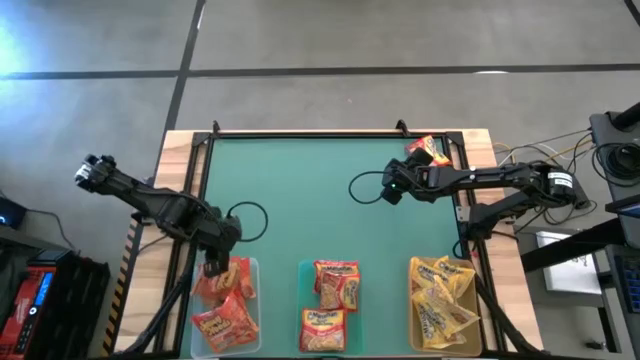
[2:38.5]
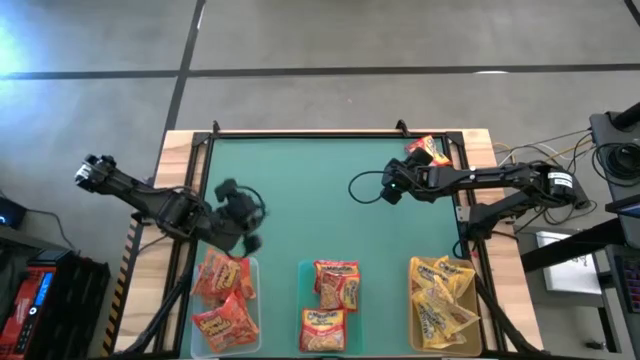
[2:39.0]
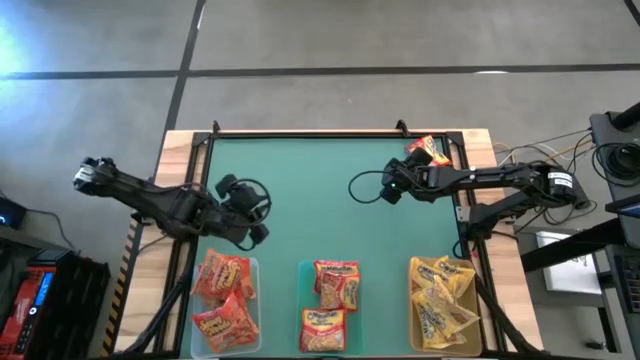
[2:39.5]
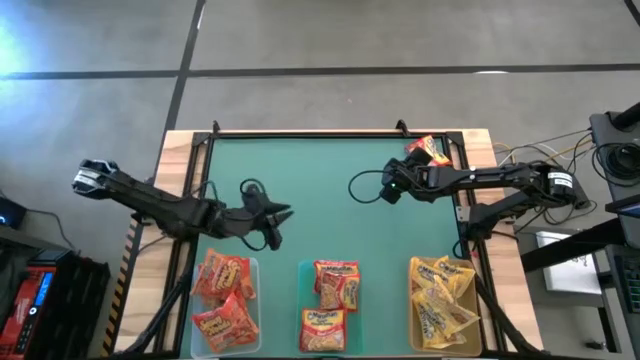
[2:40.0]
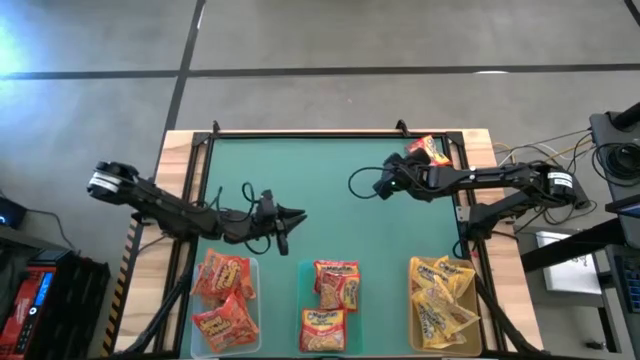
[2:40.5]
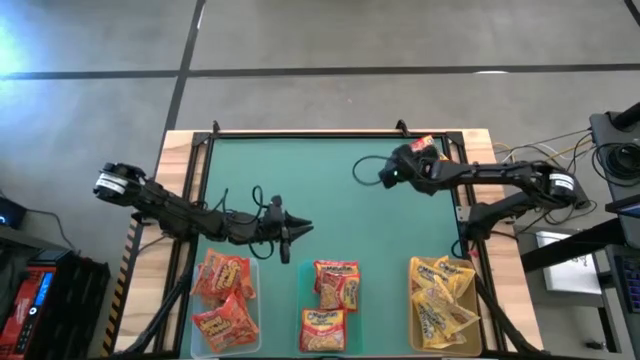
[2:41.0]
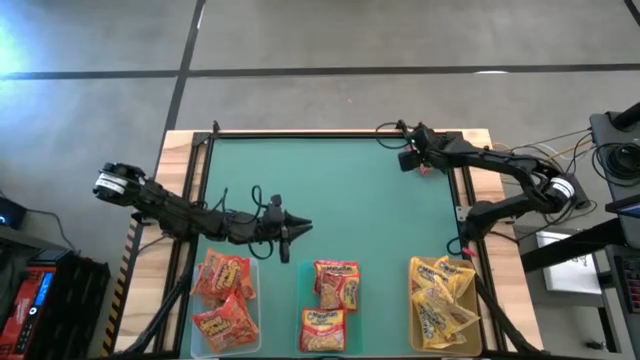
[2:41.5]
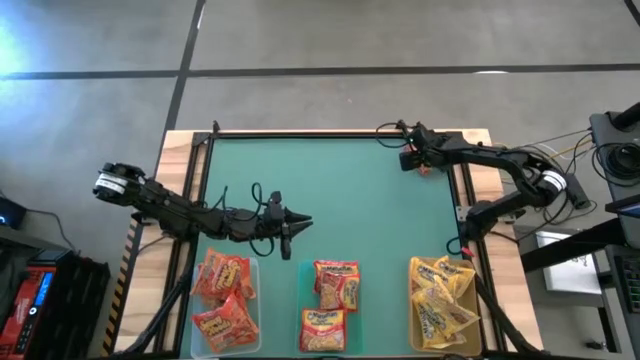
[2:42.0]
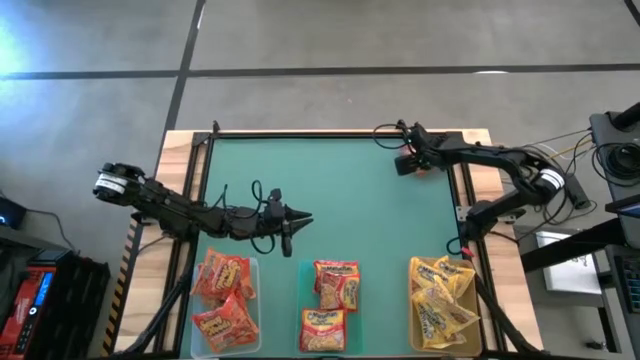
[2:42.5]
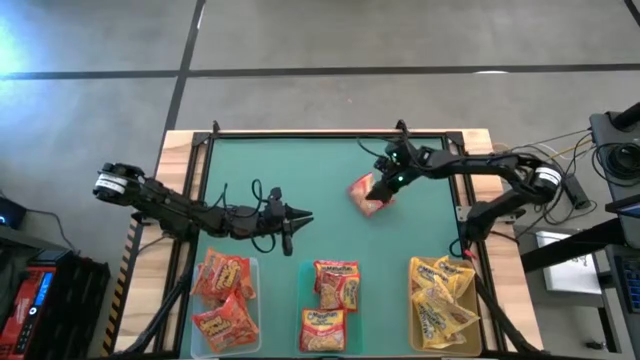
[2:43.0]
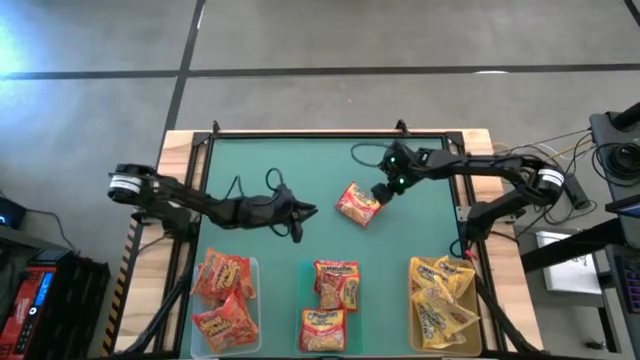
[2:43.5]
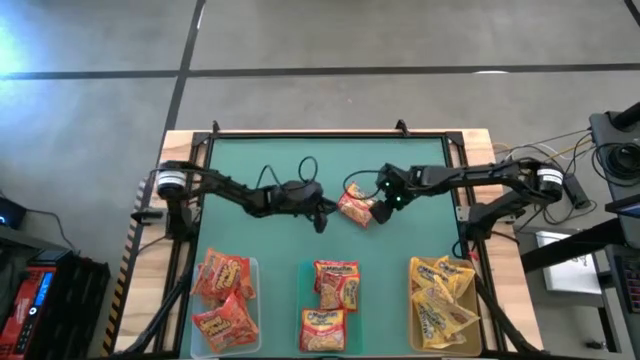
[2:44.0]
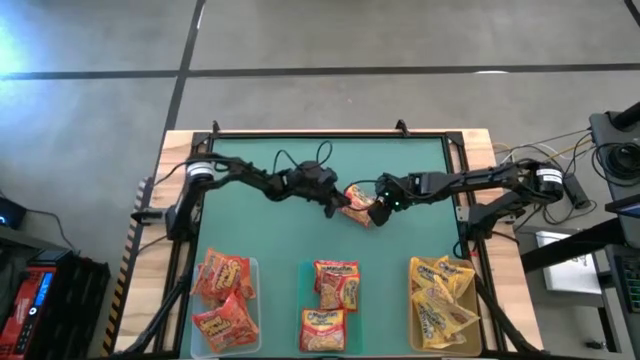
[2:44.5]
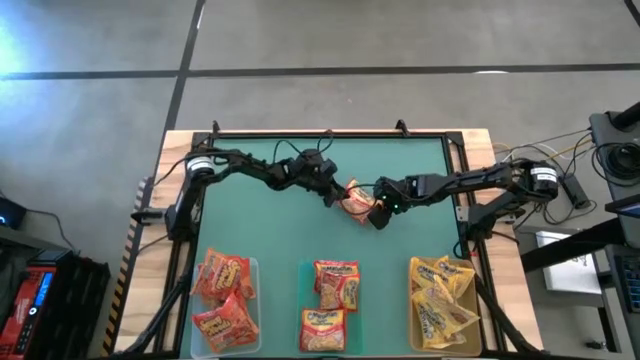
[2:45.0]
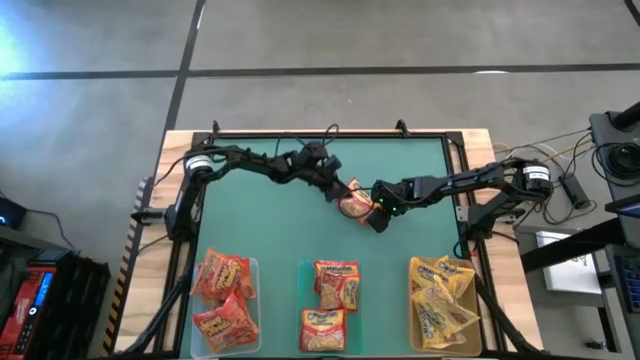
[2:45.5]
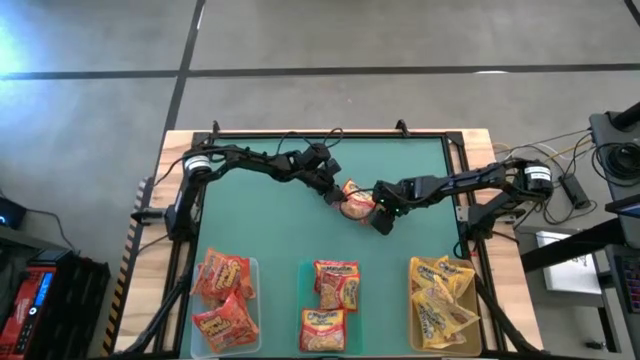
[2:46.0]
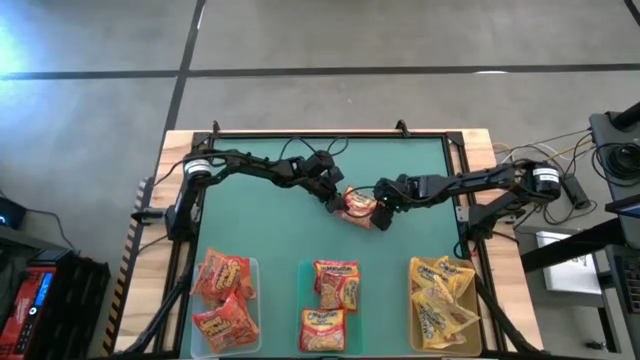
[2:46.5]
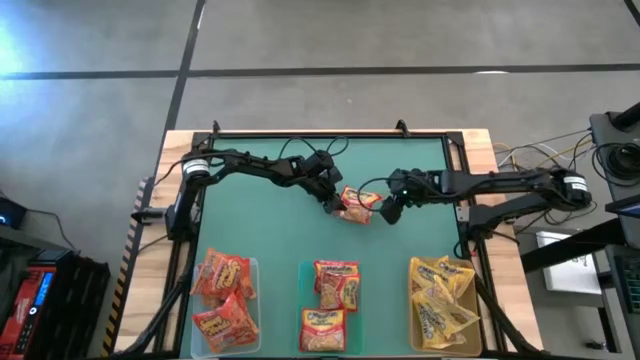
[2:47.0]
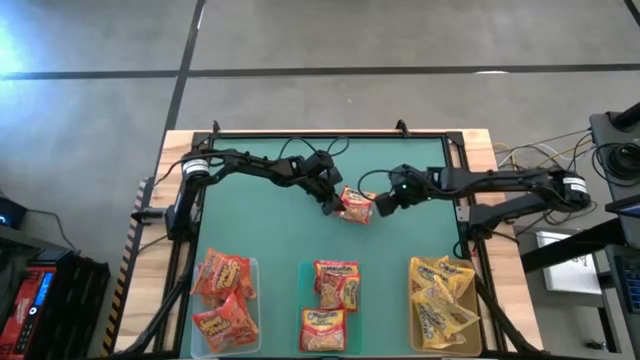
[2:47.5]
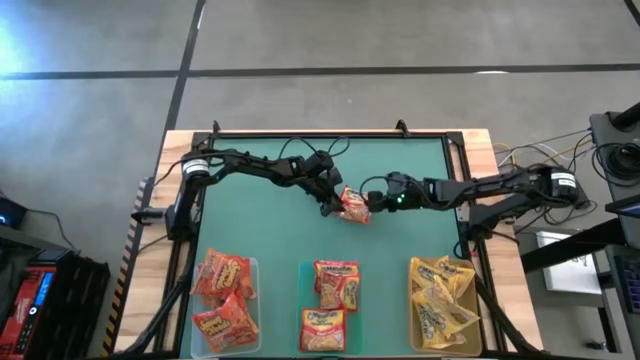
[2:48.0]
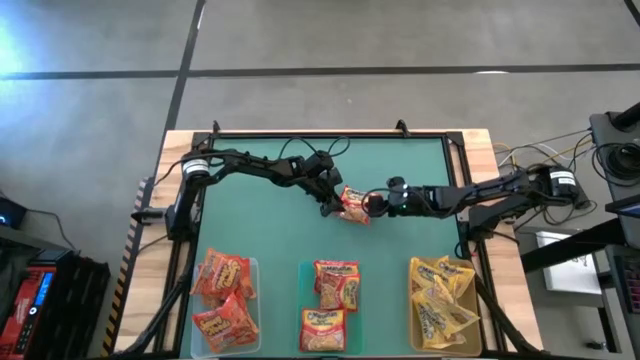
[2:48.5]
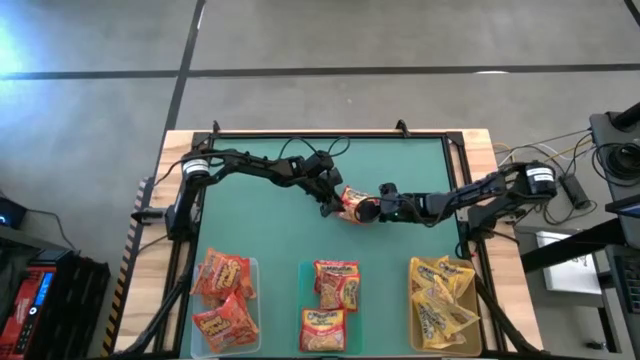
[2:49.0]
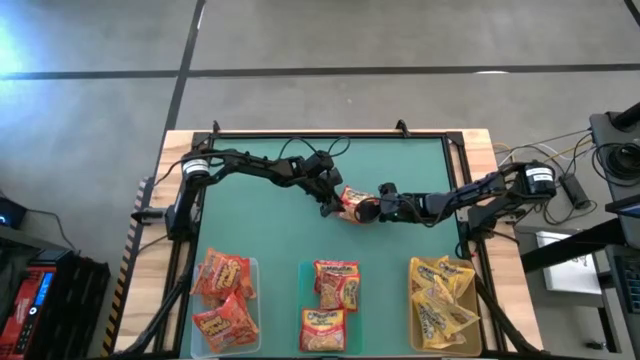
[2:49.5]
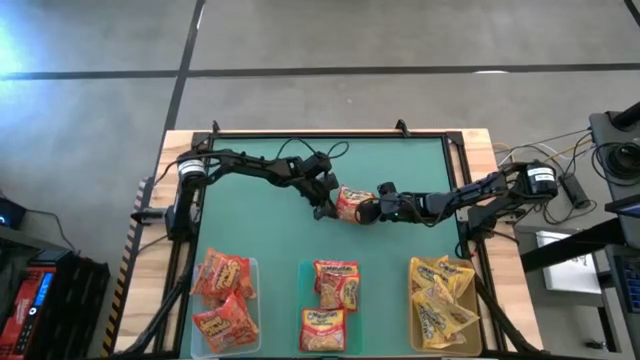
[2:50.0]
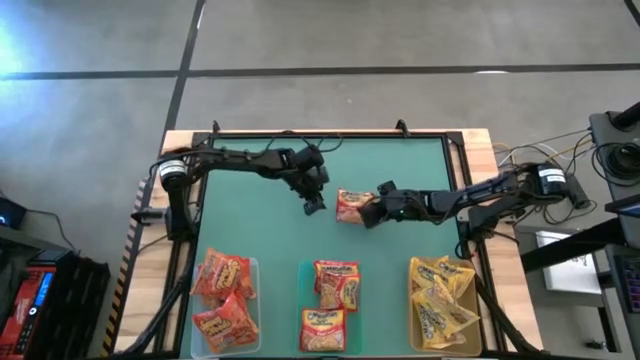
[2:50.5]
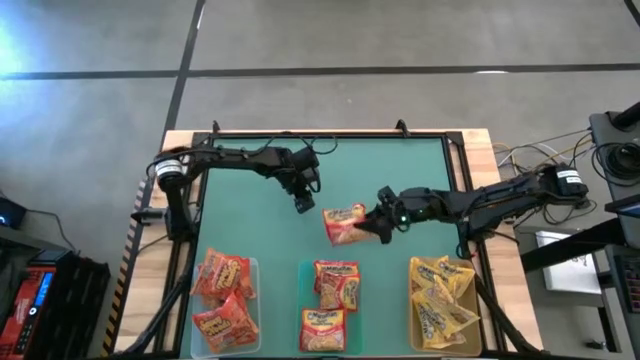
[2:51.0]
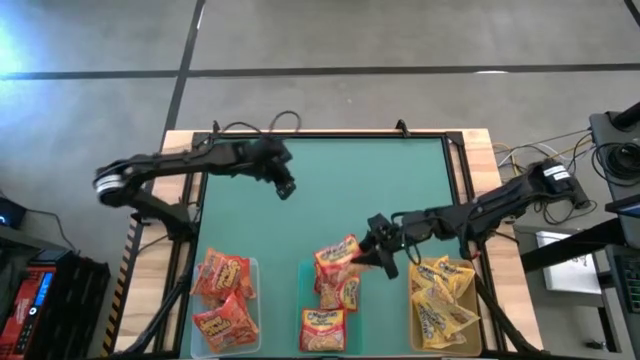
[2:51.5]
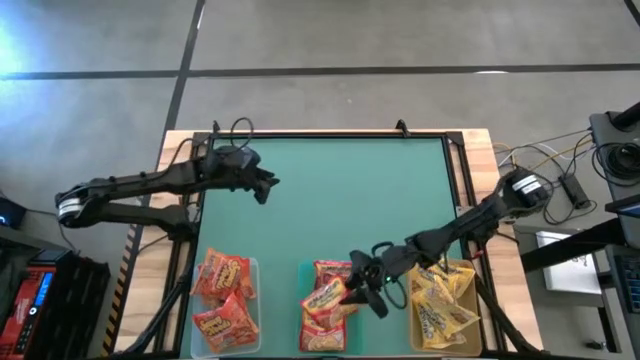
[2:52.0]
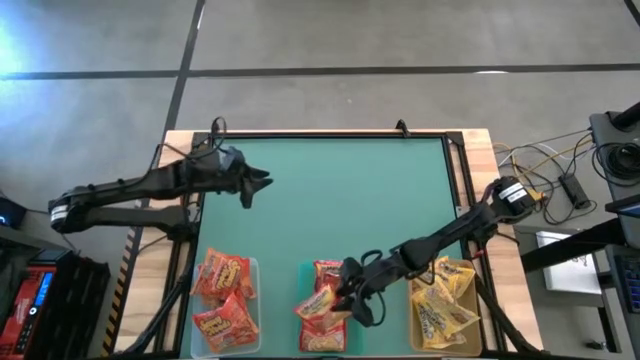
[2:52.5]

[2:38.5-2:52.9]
Task: Sort Maruchan noodles
Put the red noodle pack into the green bin
